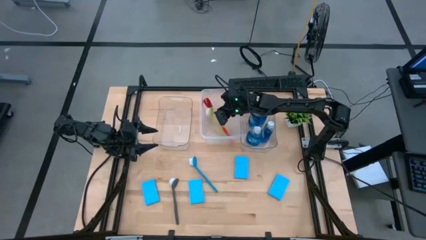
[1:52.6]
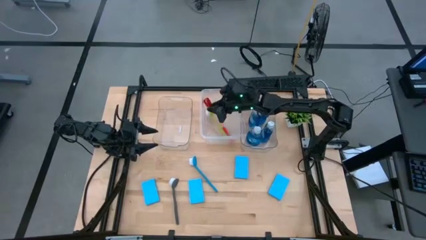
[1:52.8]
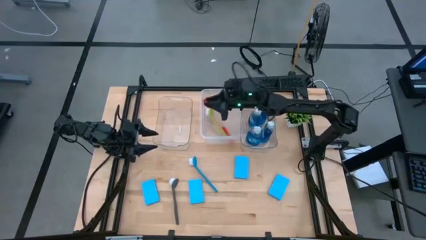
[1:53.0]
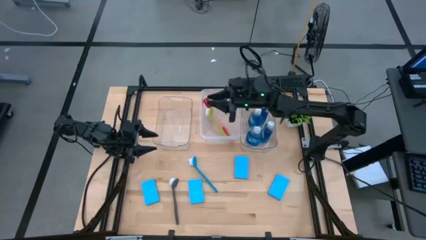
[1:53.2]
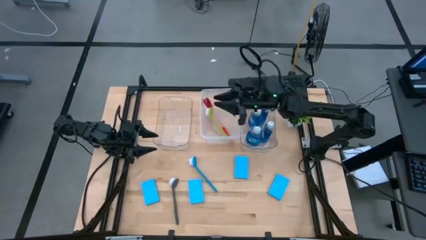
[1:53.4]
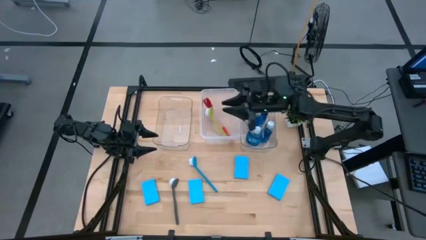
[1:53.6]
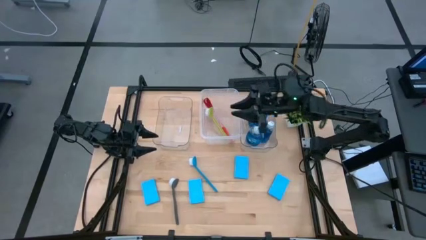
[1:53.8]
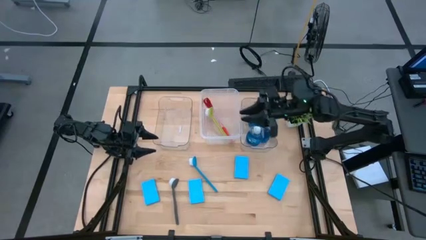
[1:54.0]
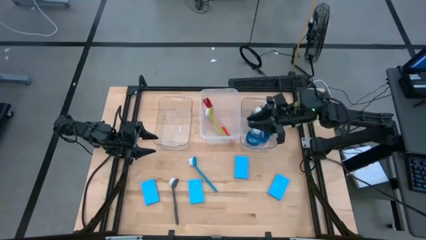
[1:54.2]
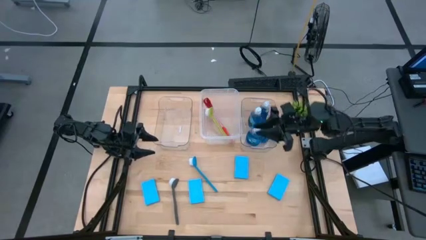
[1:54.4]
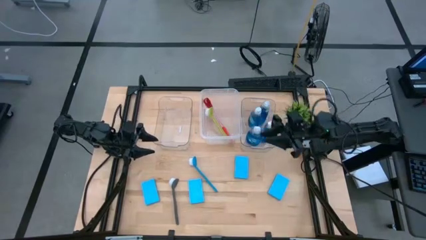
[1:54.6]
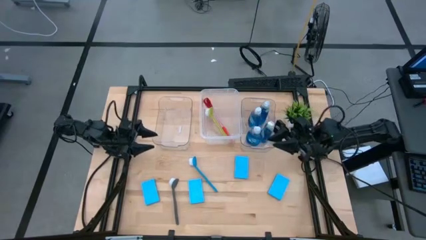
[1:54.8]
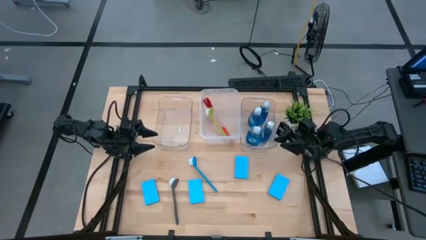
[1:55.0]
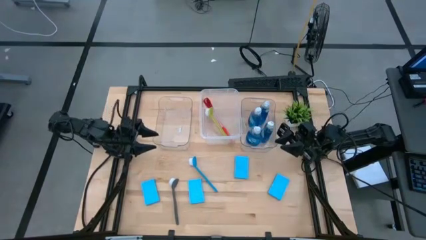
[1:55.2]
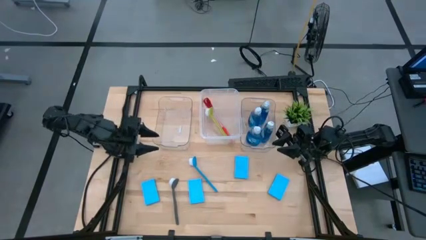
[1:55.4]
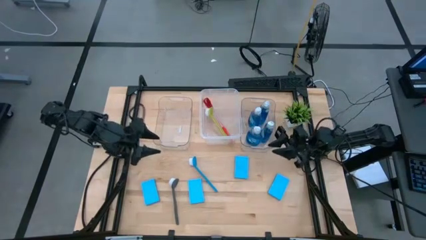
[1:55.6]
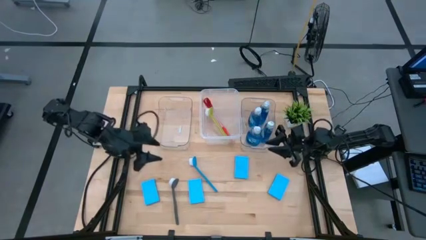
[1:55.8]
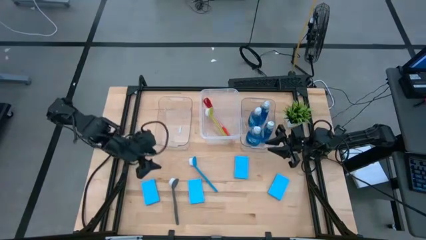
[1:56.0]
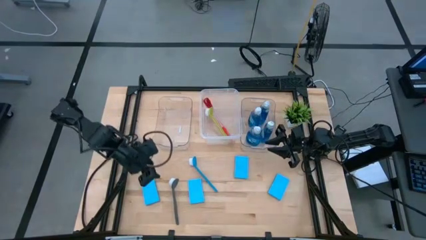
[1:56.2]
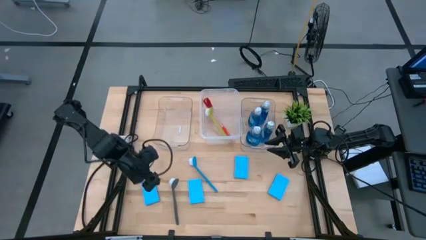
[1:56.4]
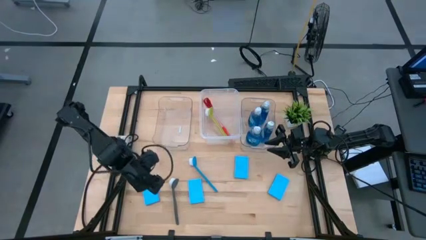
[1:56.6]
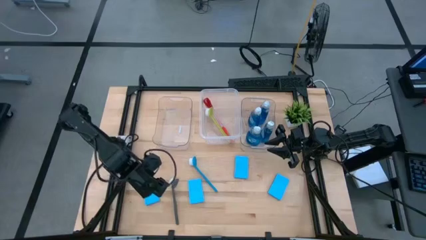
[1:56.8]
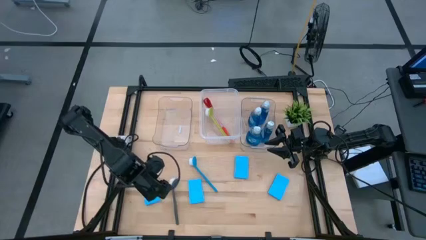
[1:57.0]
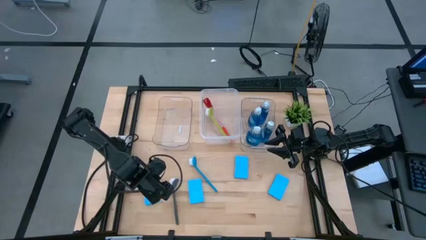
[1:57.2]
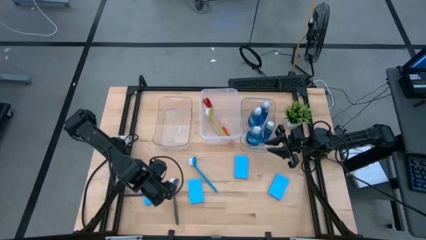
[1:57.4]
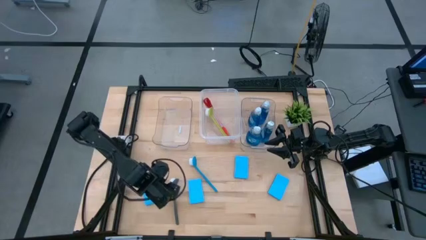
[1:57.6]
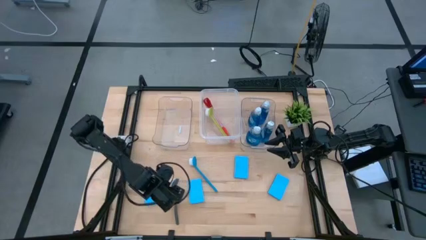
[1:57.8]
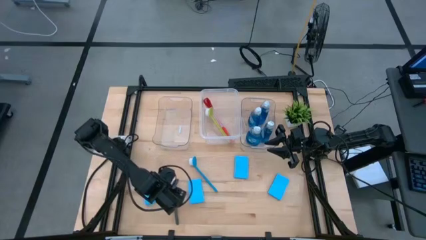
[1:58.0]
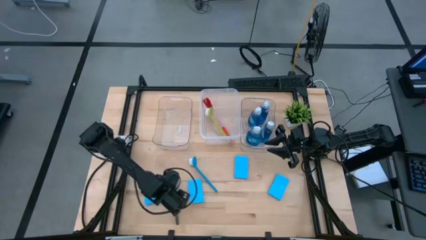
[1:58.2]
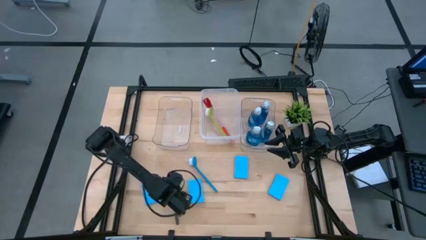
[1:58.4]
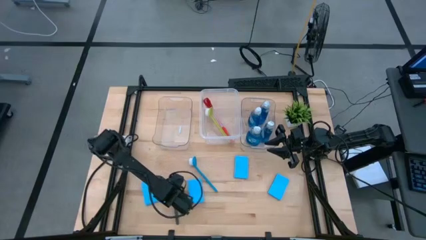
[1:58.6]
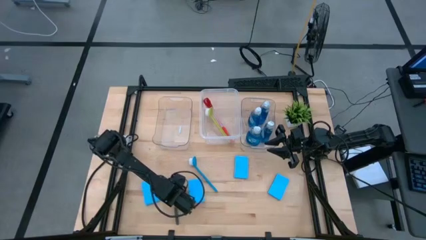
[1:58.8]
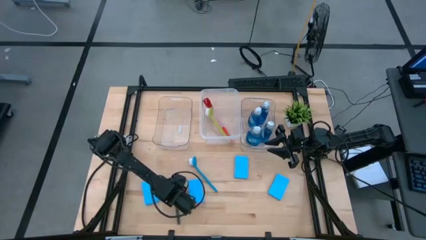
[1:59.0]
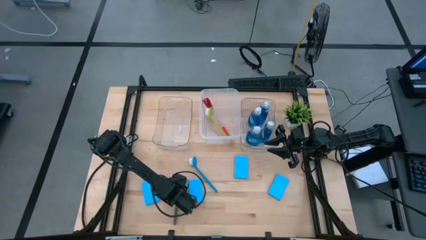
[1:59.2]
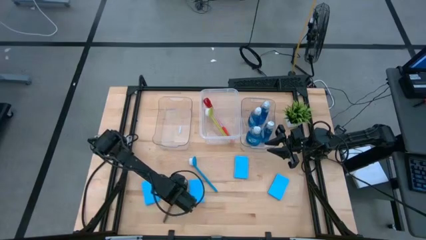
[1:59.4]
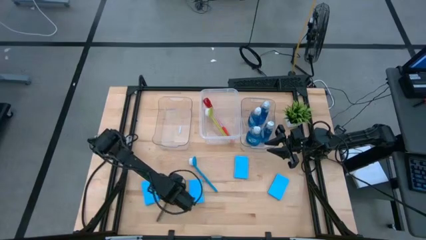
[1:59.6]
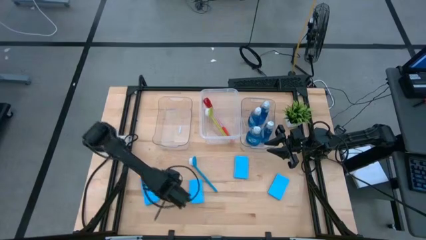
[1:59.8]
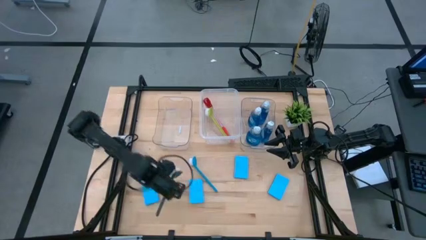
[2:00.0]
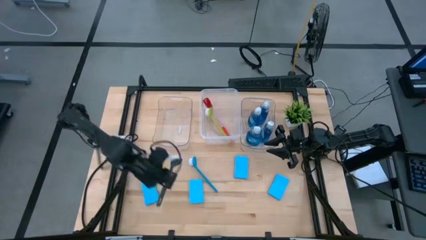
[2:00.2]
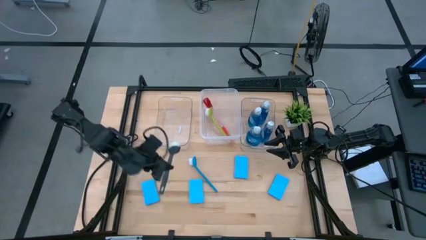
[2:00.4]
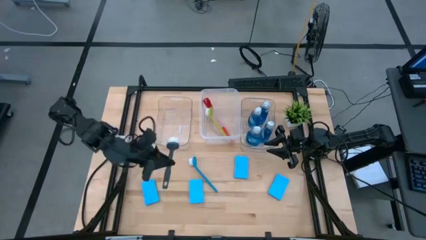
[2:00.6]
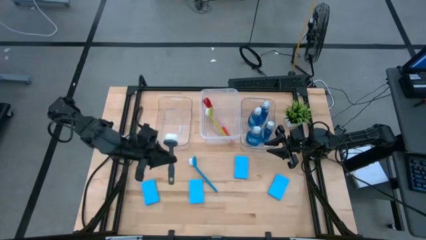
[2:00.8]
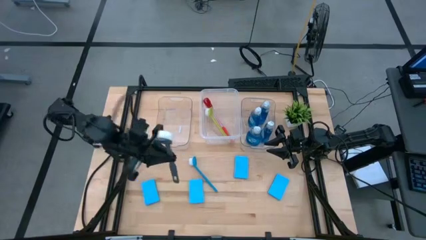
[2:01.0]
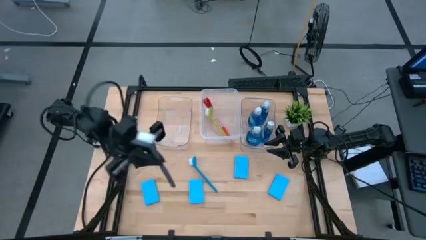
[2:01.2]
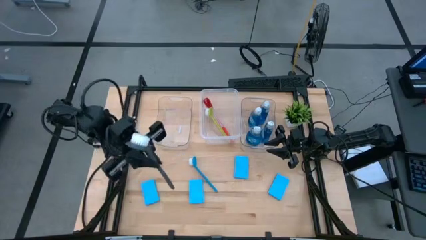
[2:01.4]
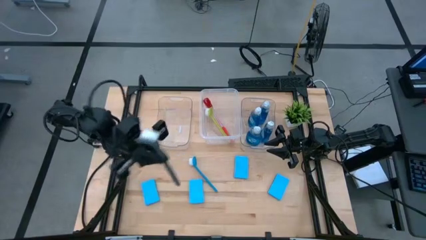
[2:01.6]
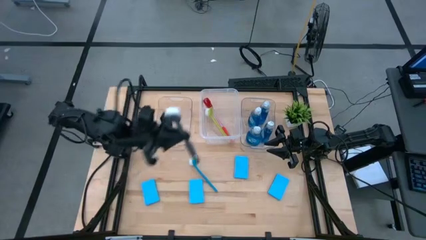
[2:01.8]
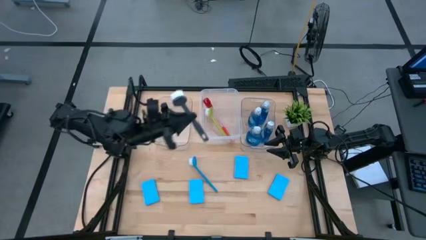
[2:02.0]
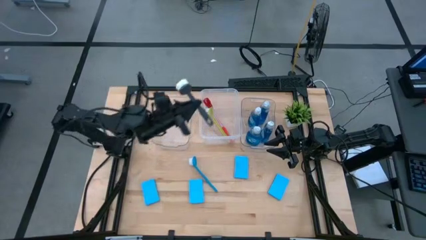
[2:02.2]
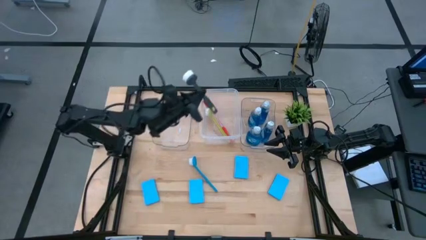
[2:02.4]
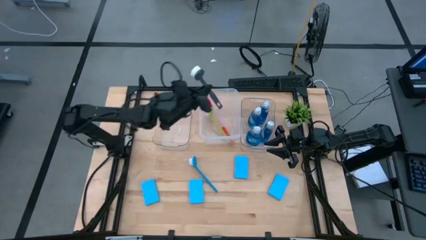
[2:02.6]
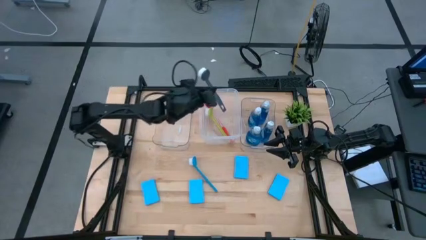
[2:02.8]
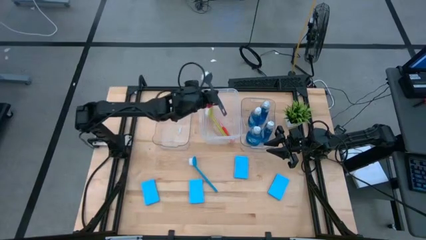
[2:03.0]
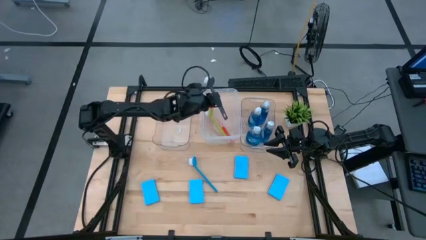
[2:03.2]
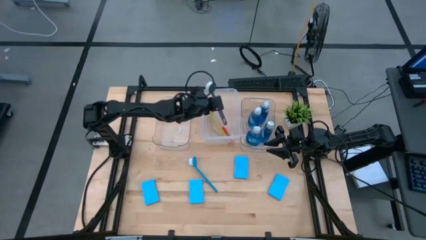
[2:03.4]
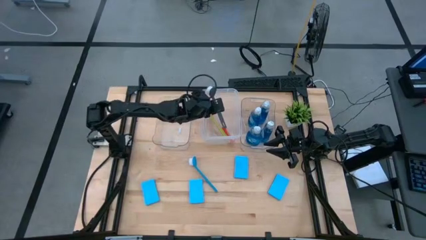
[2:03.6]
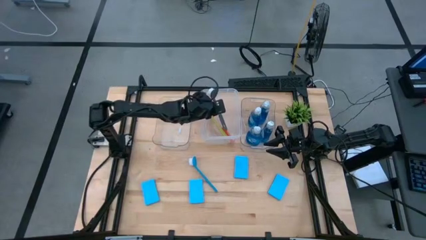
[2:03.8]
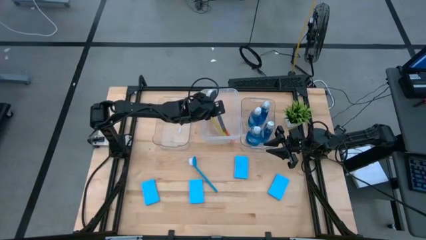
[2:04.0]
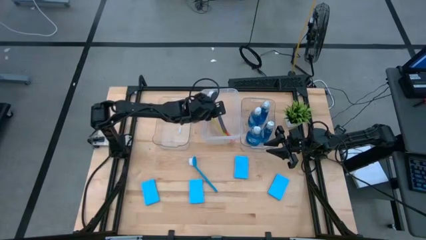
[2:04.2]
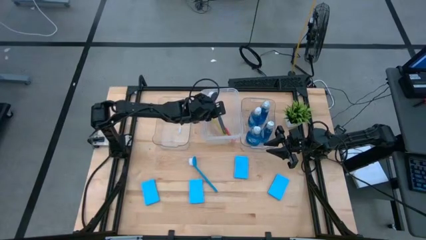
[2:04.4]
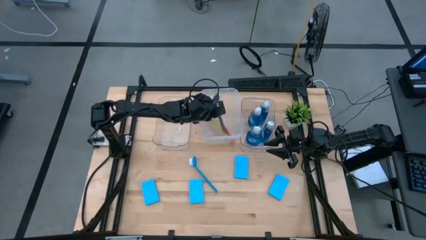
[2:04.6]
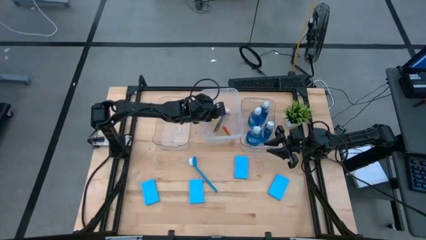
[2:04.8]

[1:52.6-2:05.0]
Task: Pick & Place Kitchen Sink Supplies
Put the black dishwashing brush into the middle transparent bin
